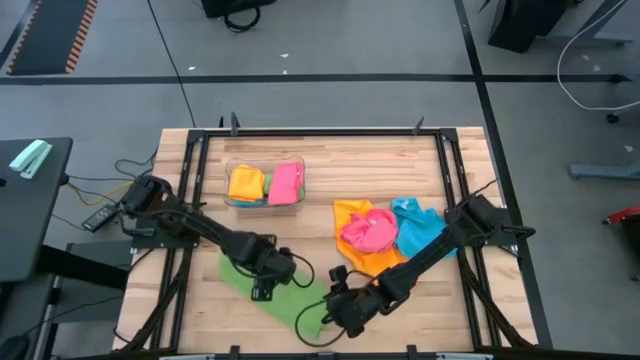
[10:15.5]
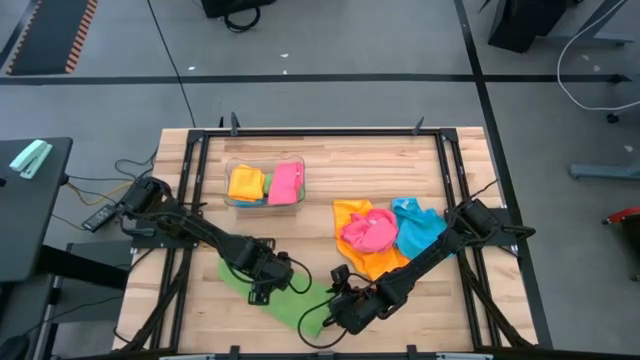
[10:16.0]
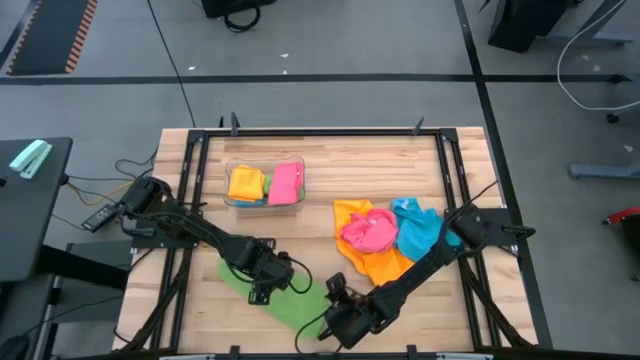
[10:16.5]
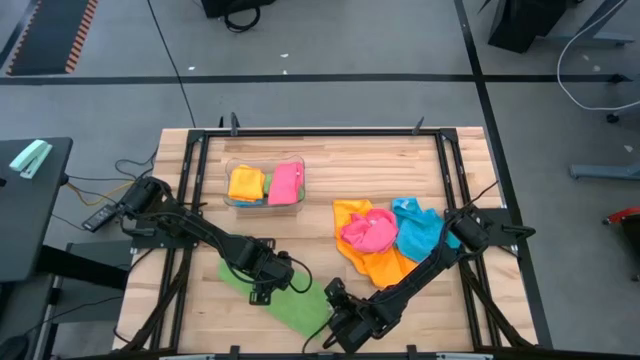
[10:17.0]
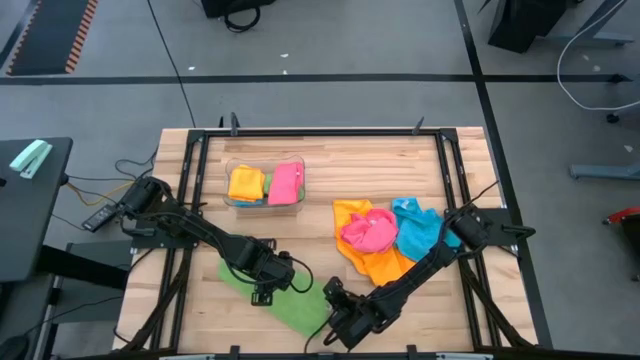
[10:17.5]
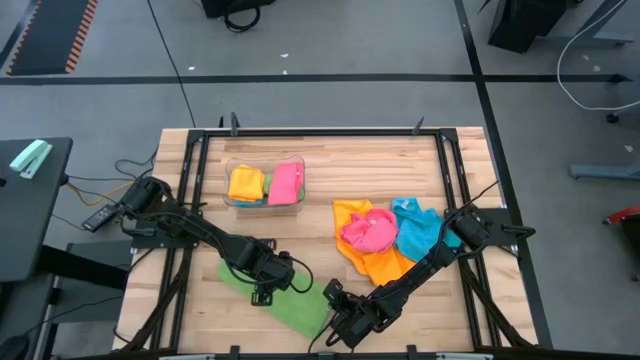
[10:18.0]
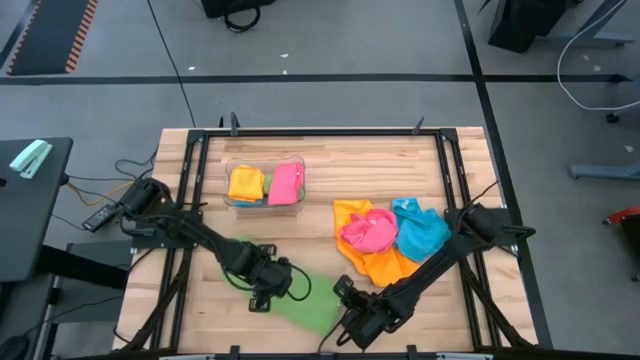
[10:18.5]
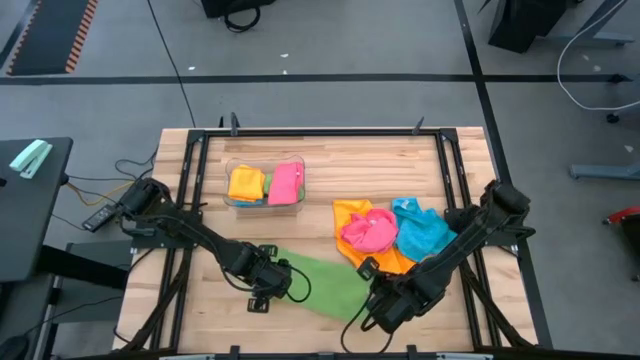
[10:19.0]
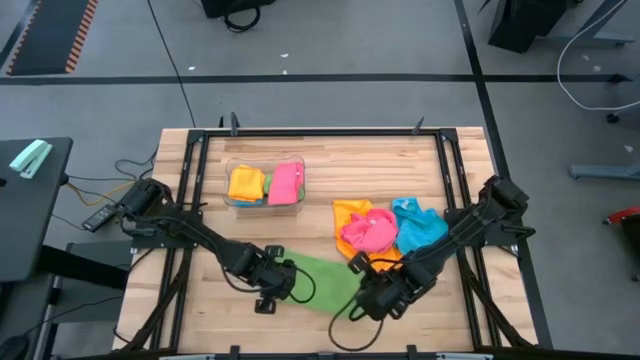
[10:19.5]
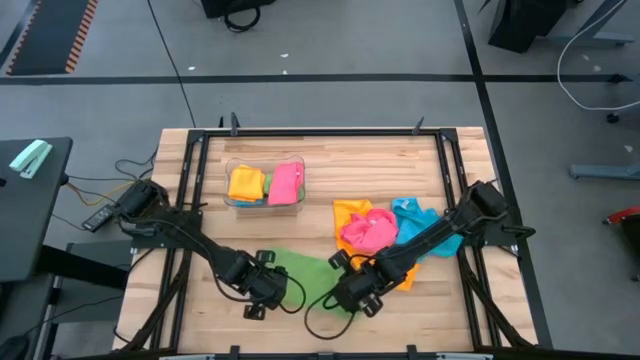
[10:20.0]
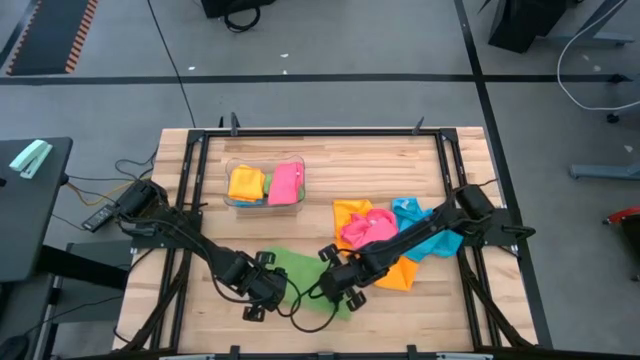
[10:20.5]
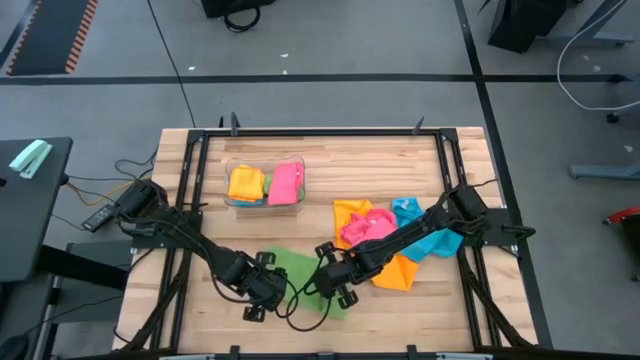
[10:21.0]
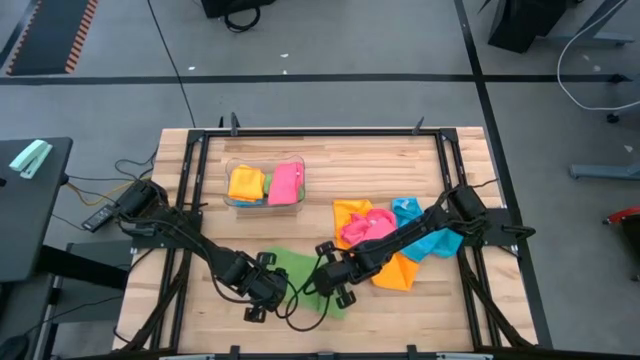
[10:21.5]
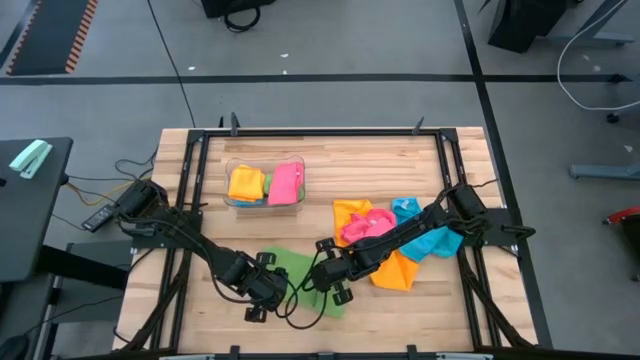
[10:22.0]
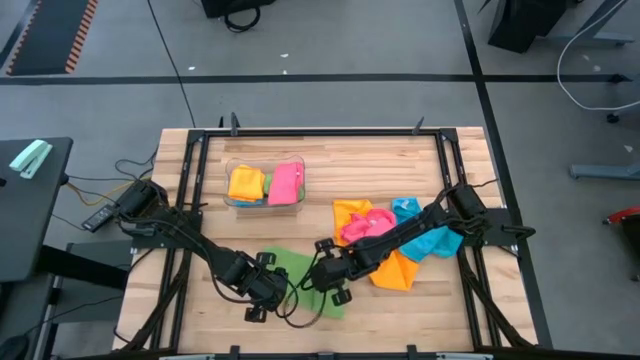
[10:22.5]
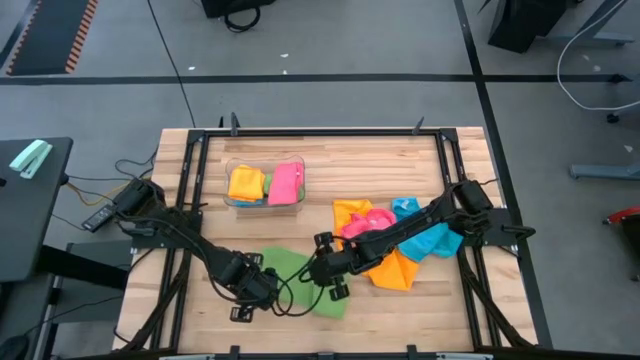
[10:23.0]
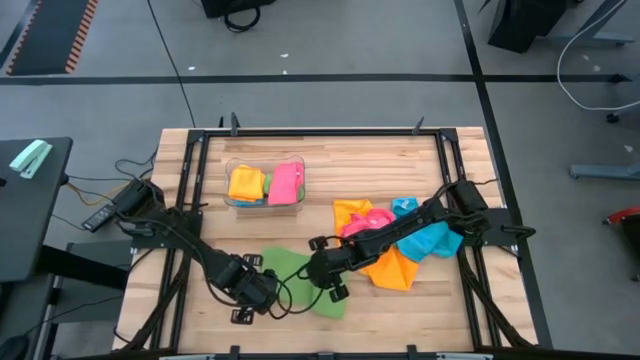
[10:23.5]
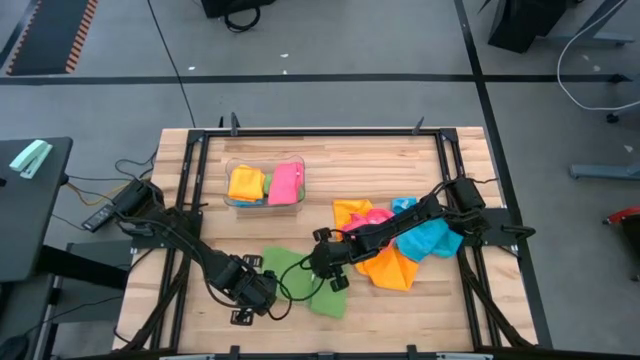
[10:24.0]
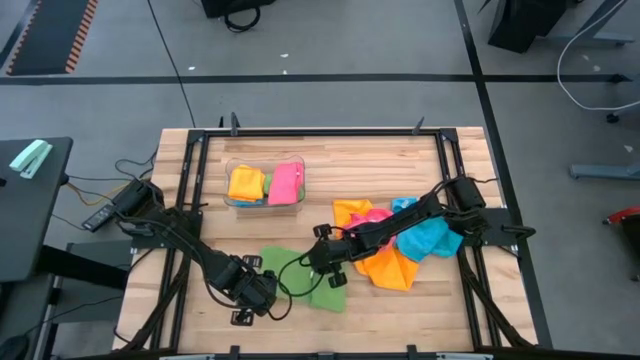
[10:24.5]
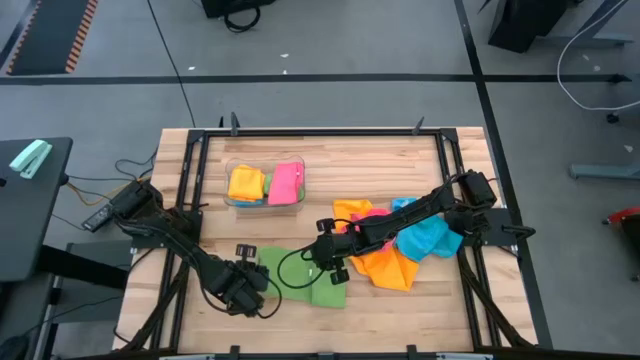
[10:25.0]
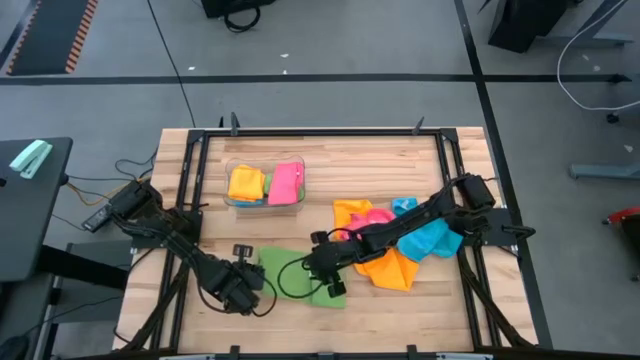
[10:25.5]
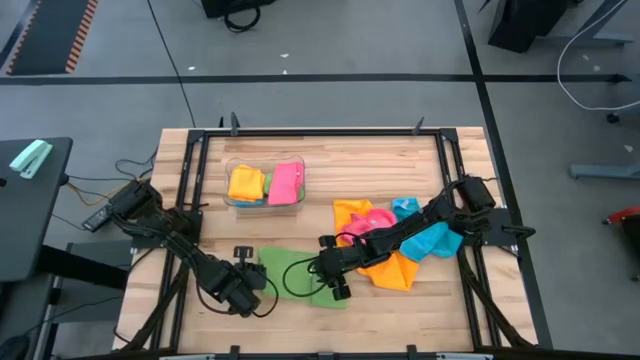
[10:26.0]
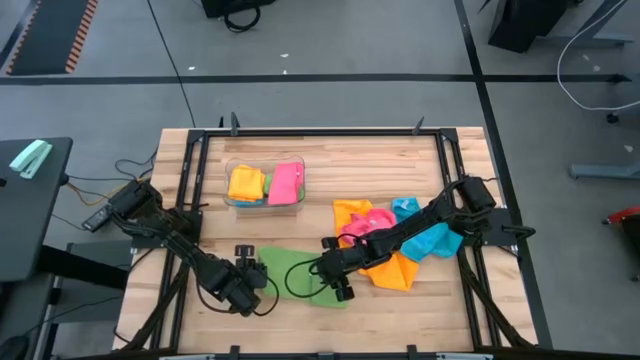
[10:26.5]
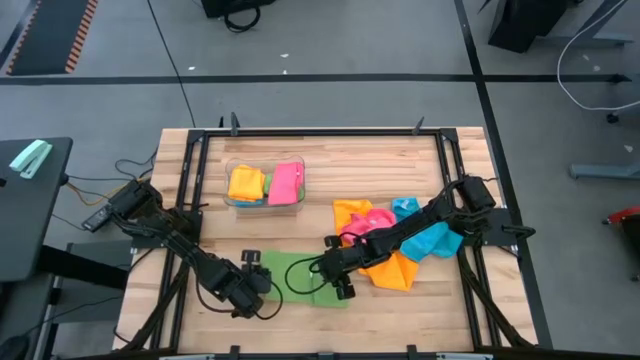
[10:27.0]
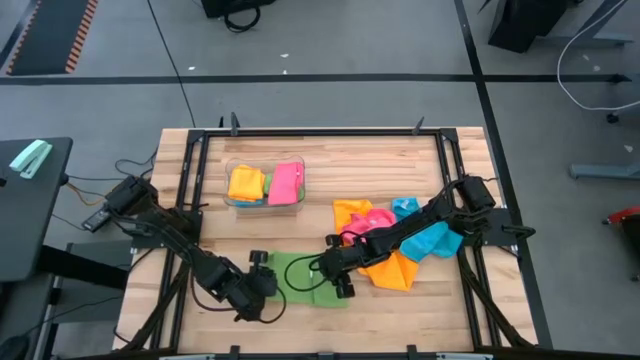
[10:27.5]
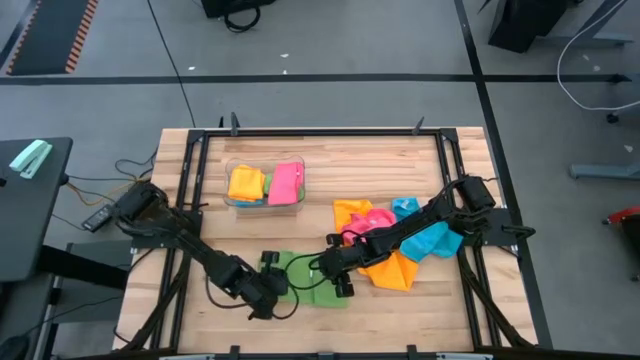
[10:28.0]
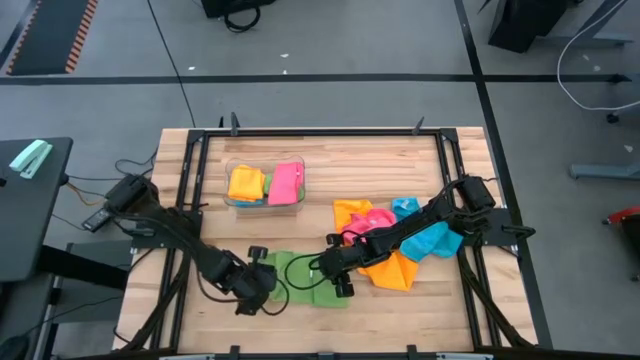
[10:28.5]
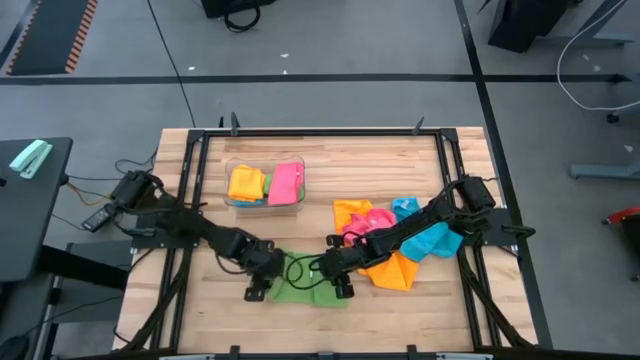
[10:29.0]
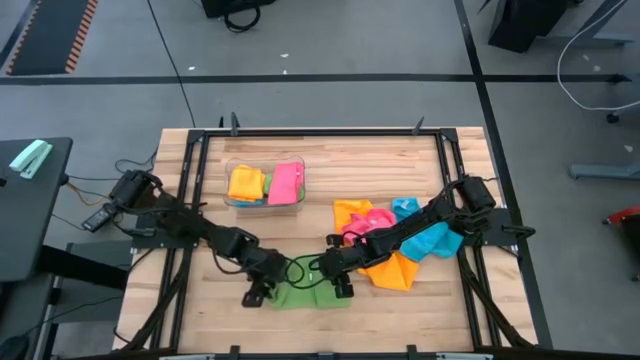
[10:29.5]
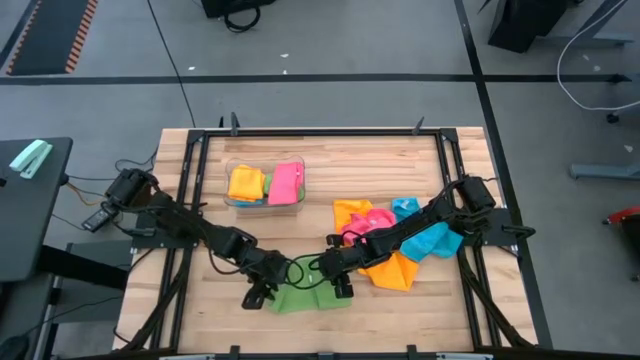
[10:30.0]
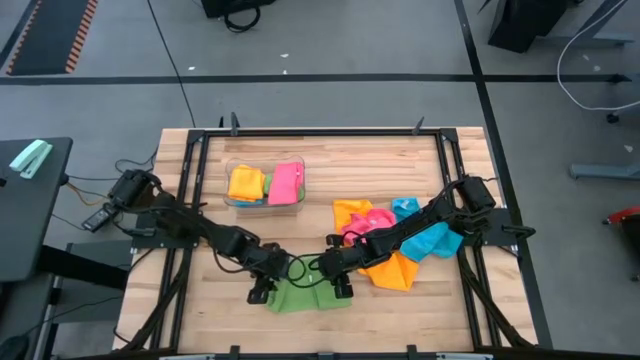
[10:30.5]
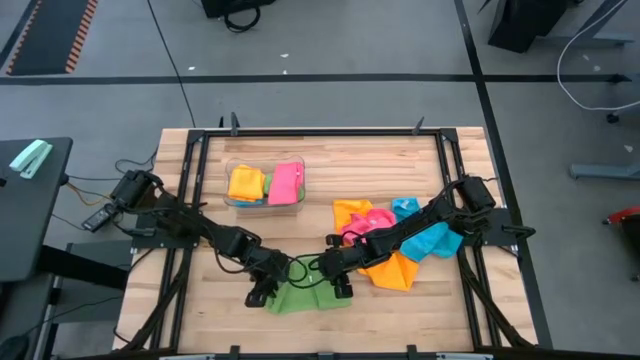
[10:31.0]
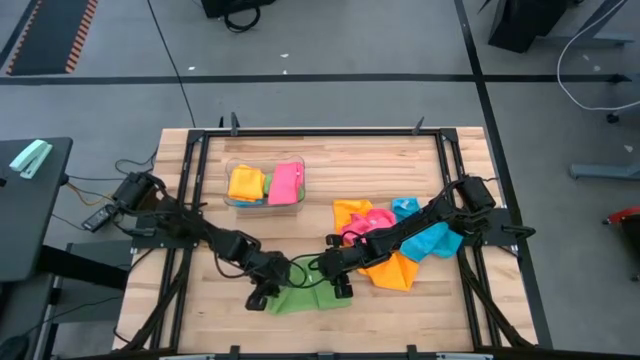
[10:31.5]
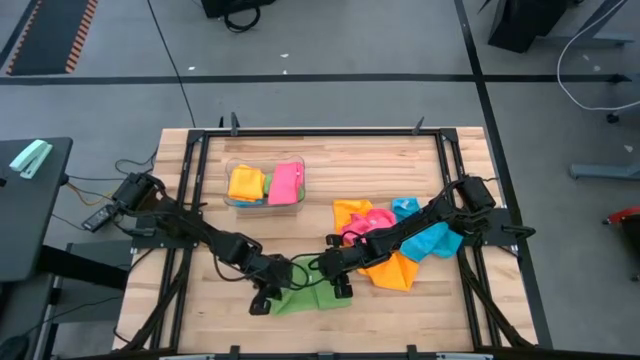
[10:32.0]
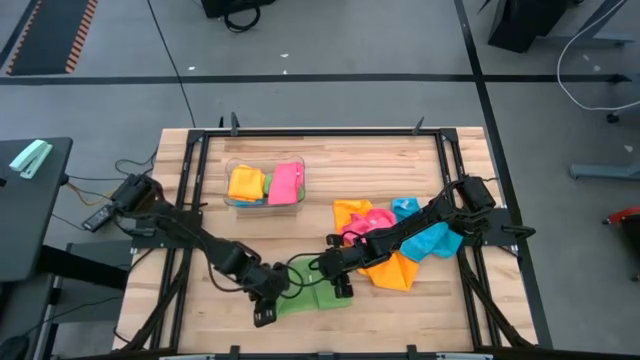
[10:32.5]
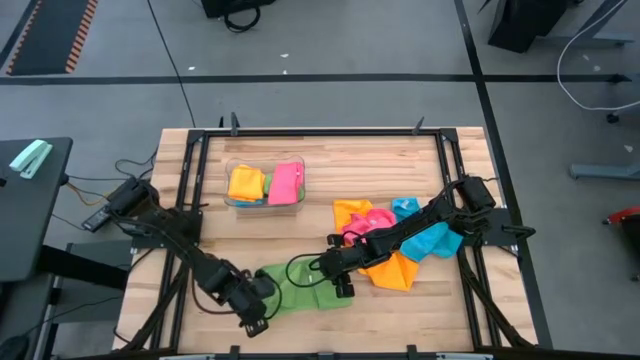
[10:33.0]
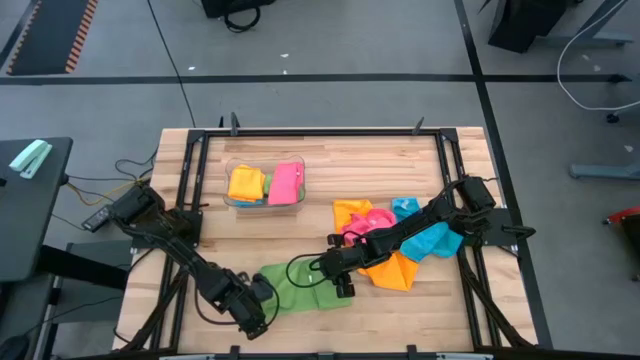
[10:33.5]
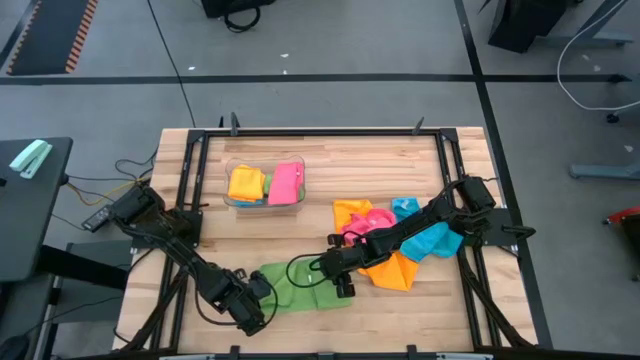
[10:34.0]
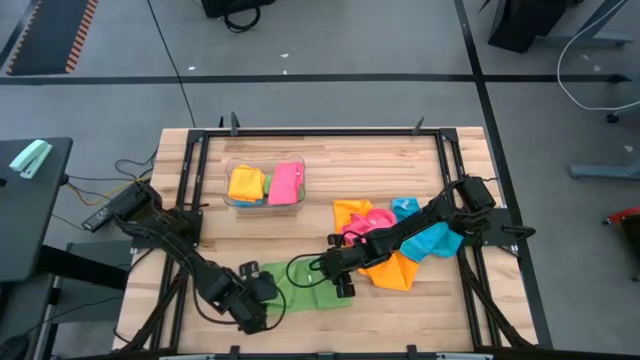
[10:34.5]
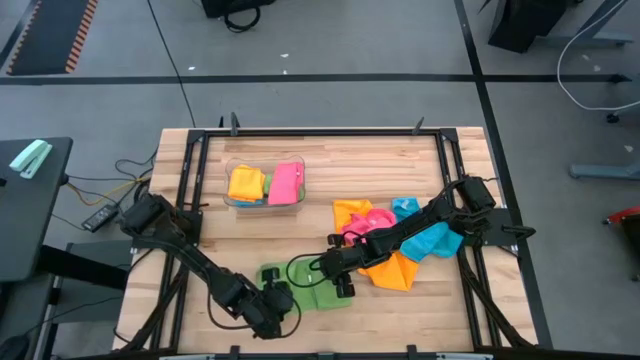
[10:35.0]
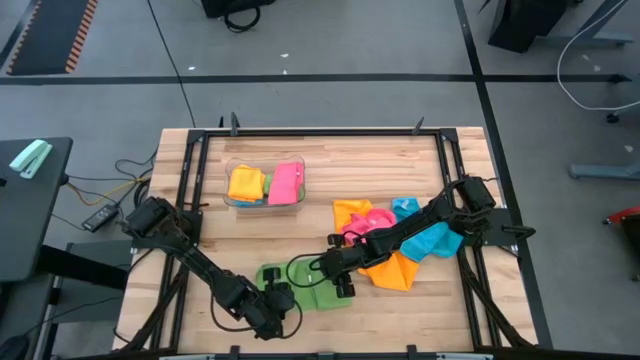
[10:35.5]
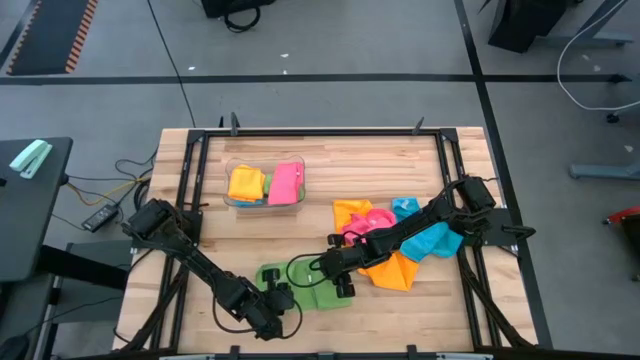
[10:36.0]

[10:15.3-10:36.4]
Task: Fold microfiber towels
Fold the green microfiber towel
